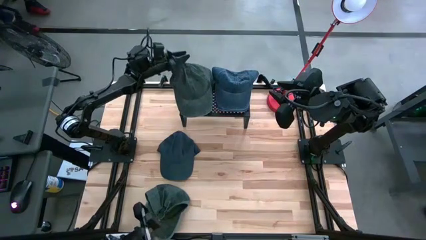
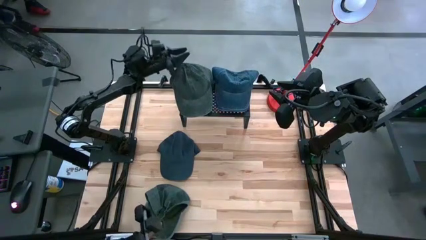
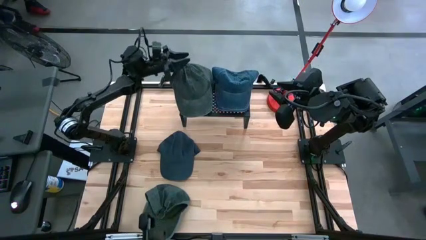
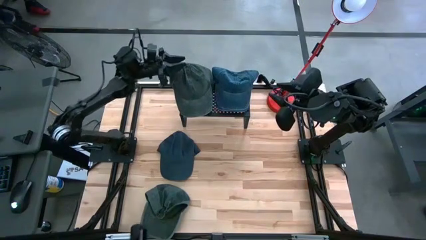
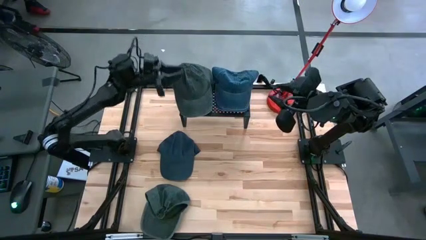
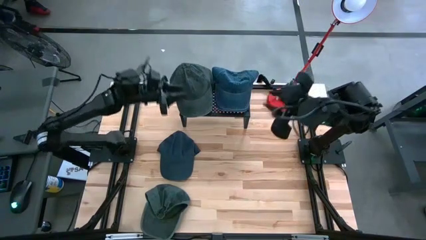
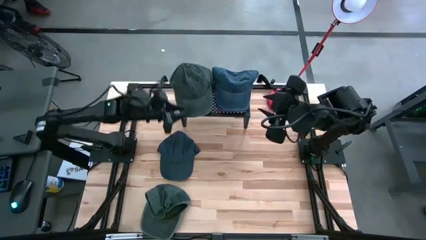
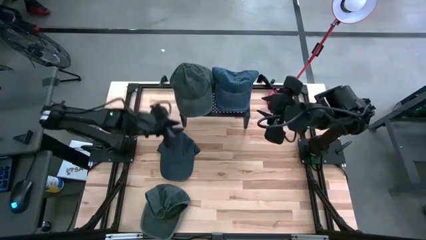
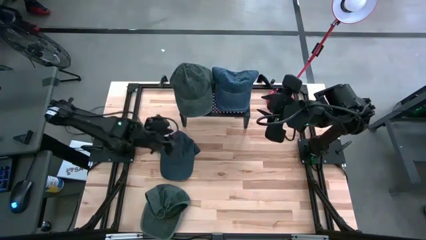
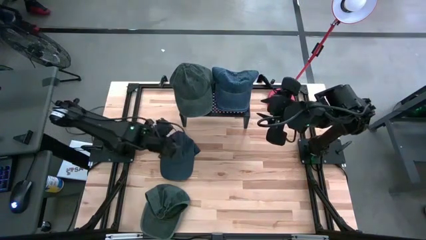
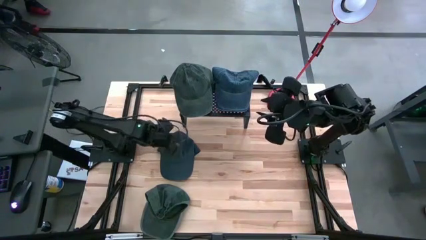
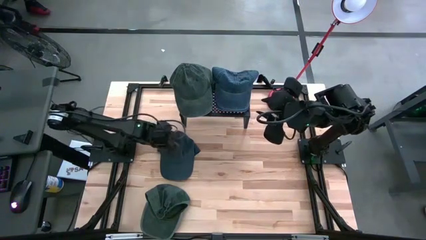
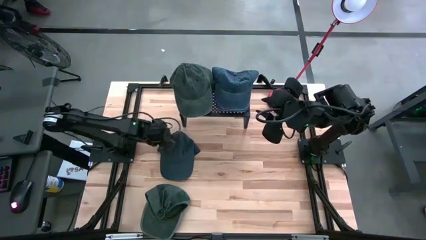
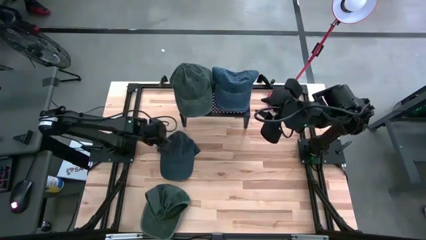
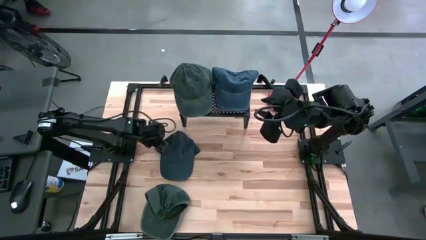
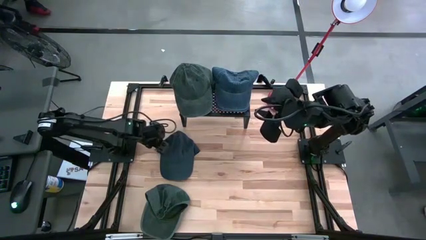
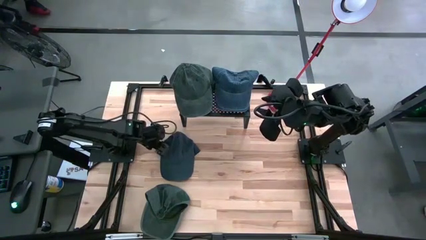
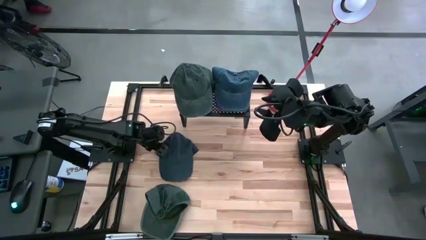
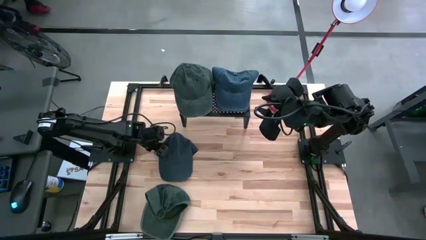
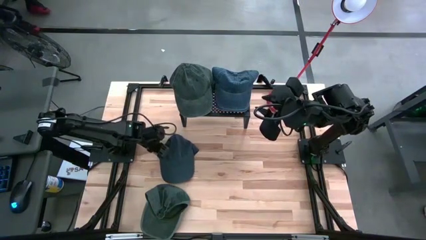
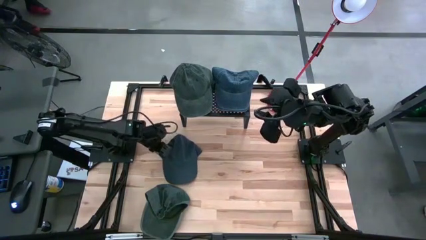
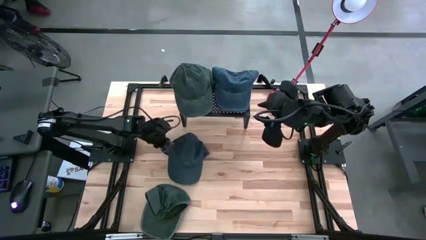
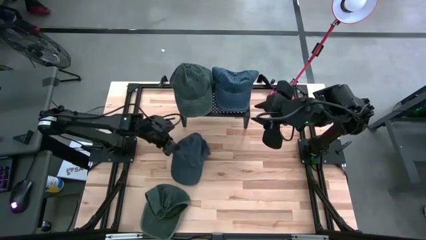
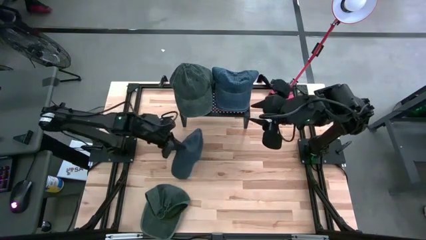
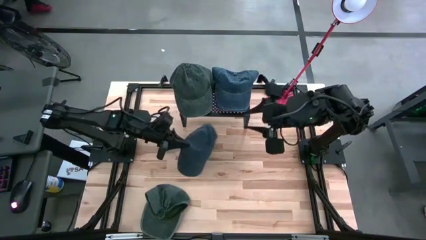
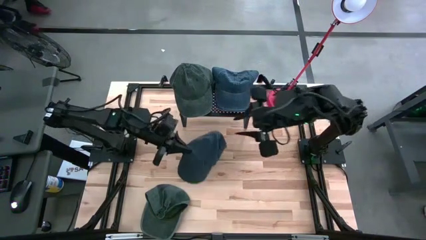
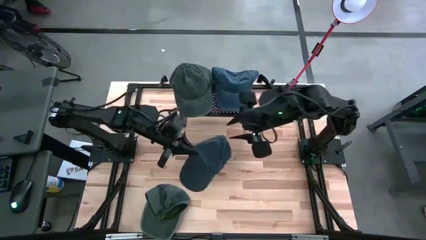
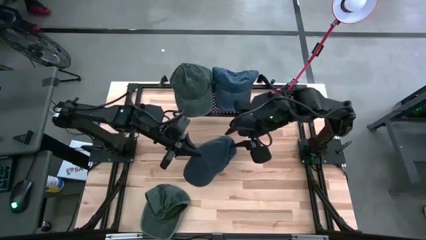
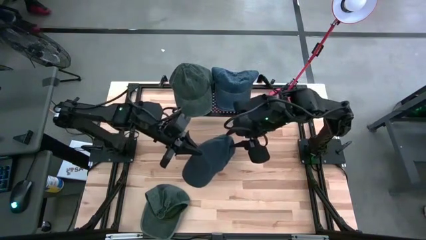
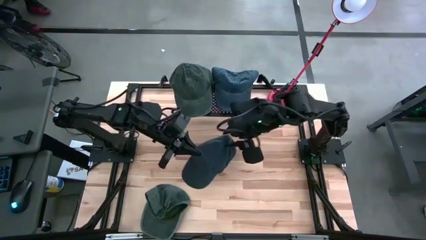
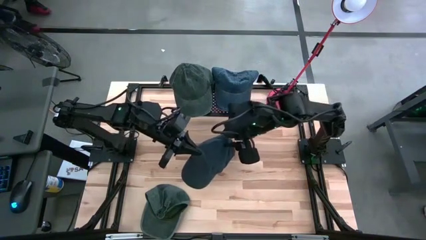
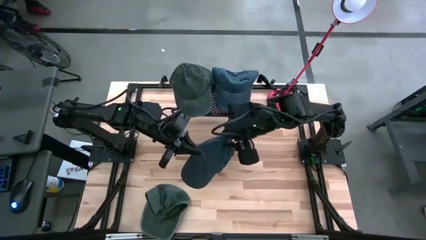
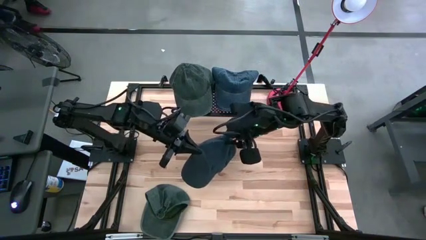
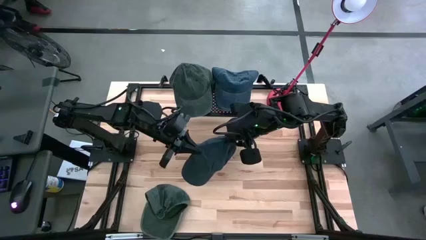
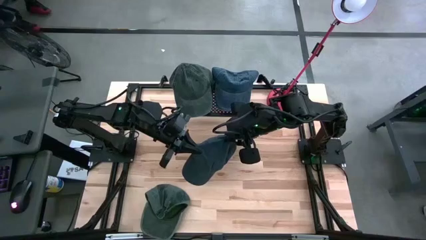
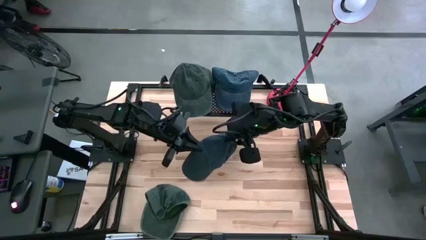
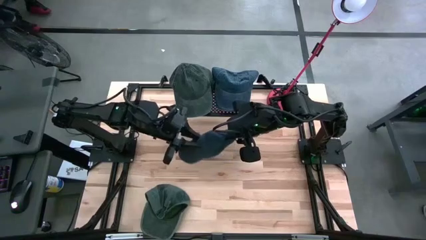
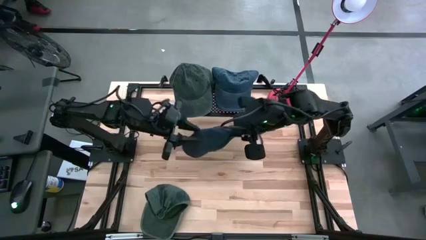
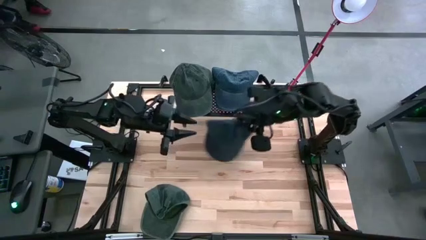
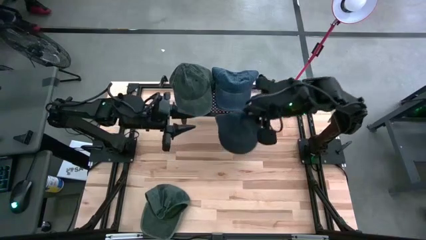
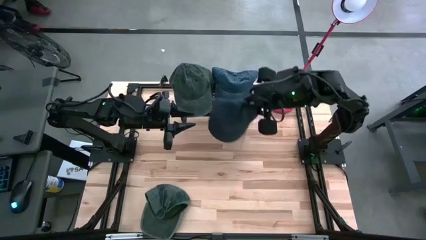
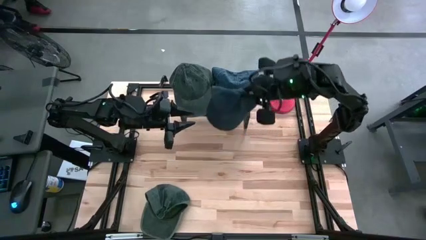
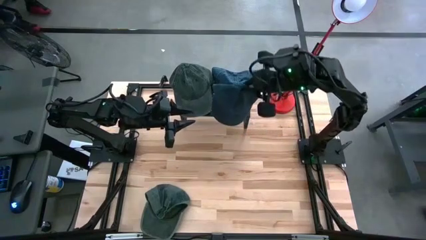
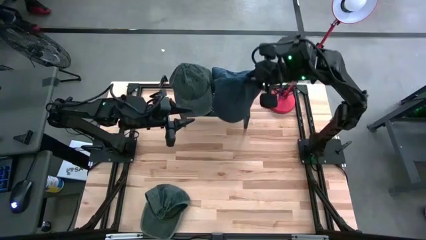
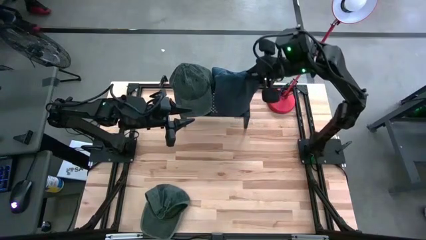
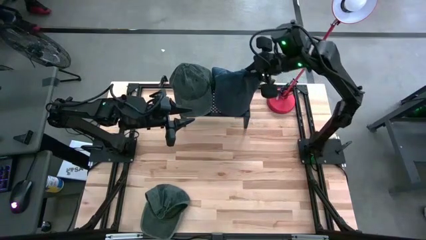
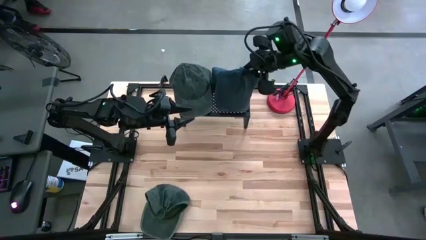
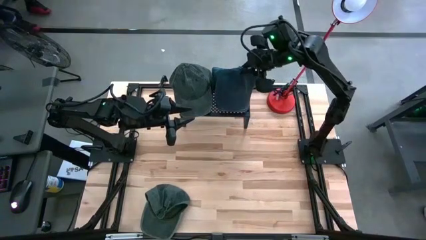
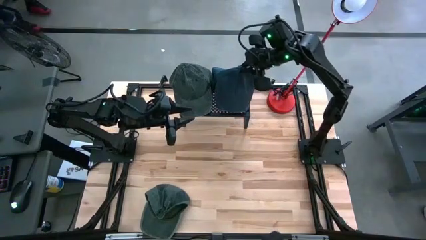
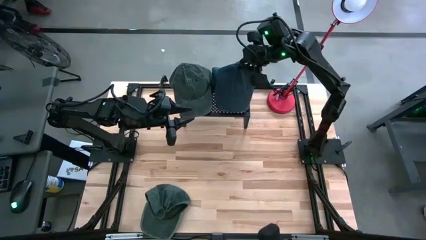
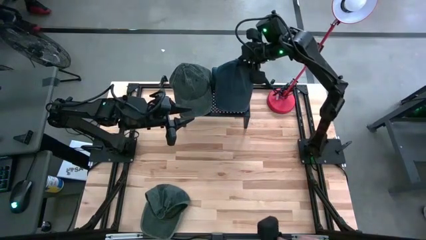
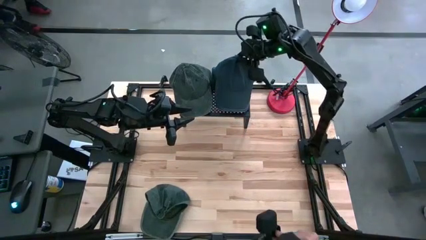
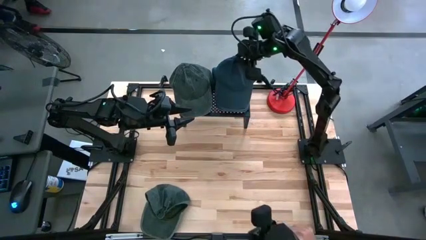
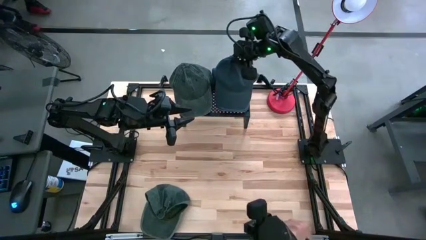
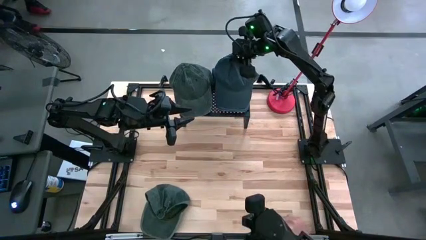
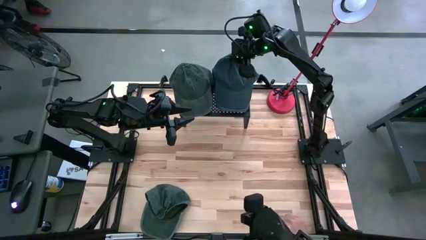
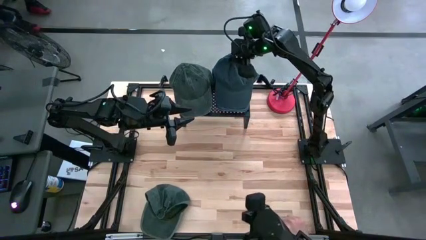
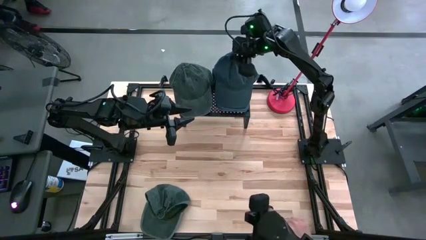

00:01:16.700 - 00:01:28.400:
Task: Pick & Place hat
Stack the dark blue cap on top of the other dark blue caps on the shelf
